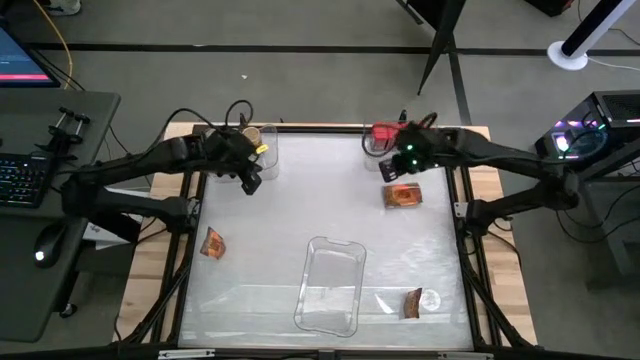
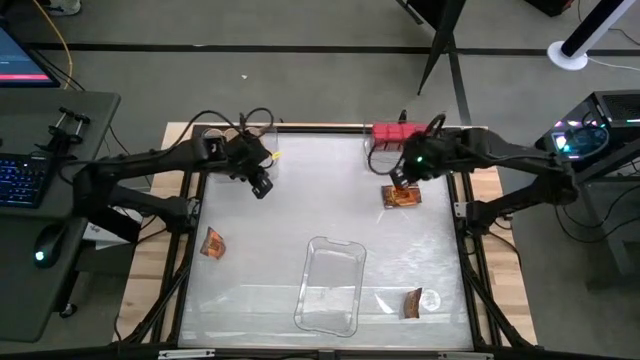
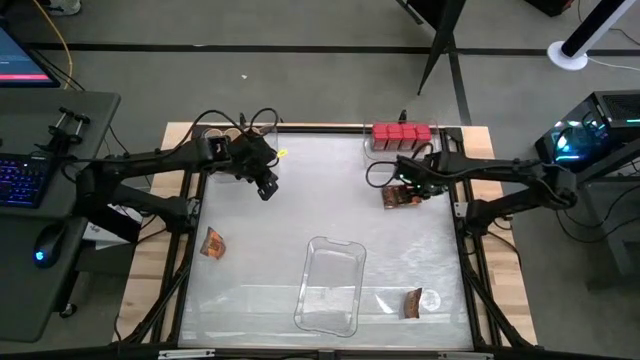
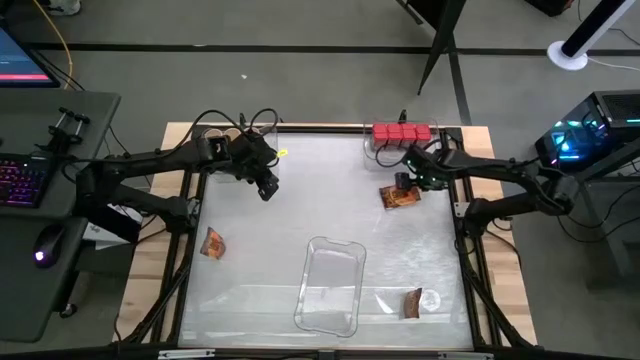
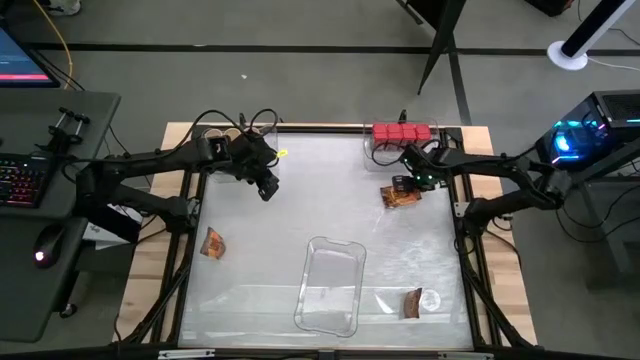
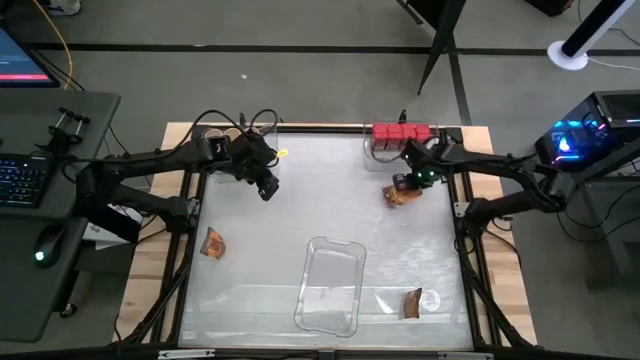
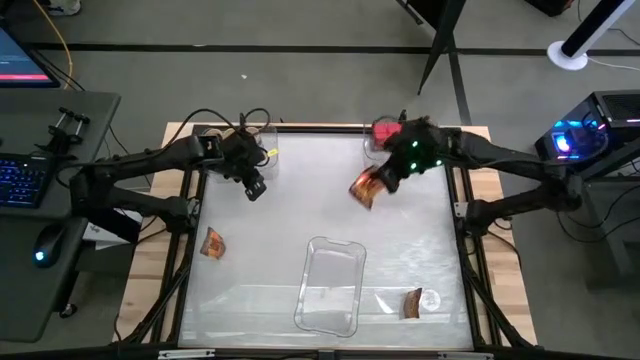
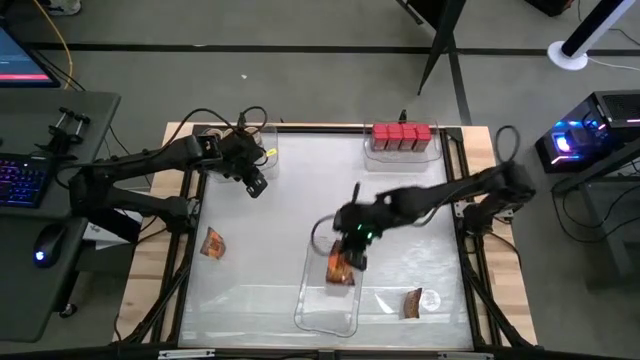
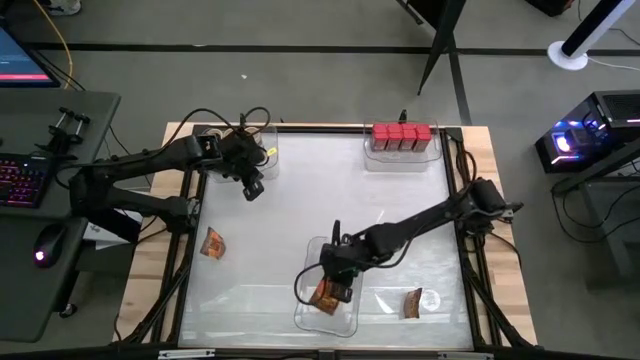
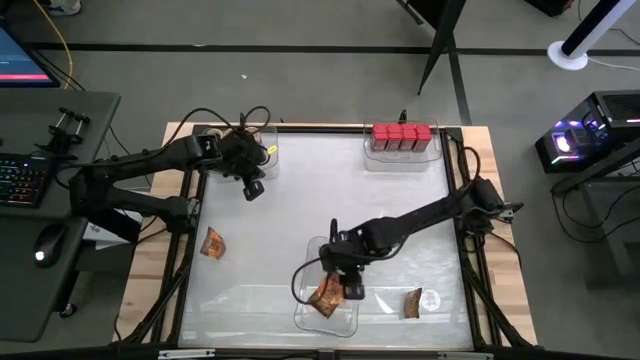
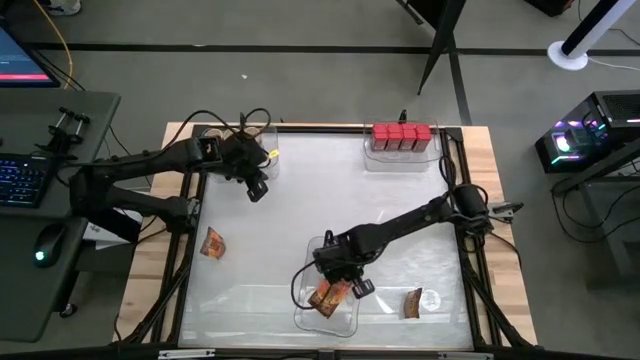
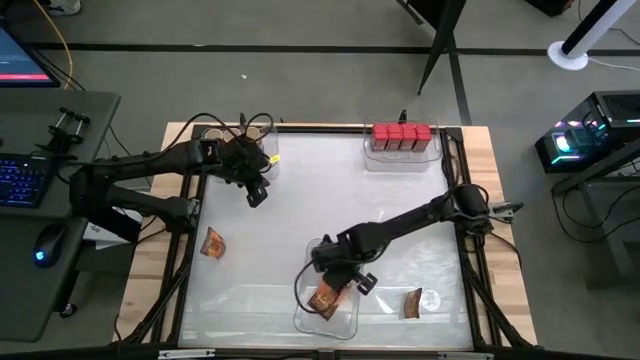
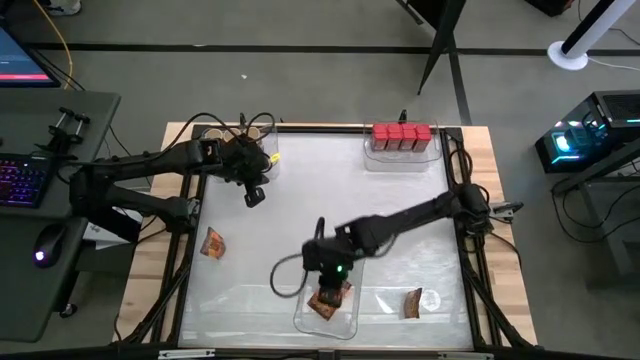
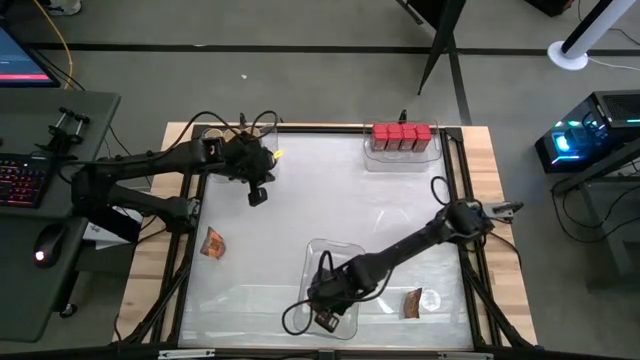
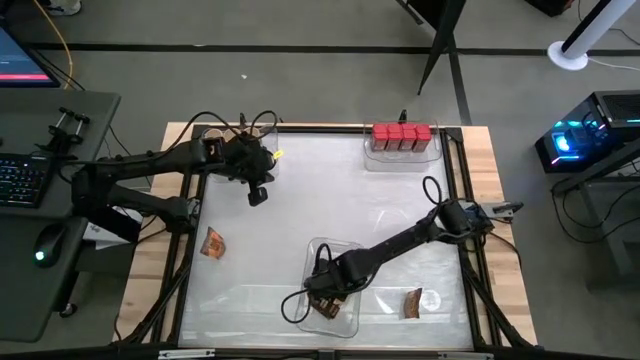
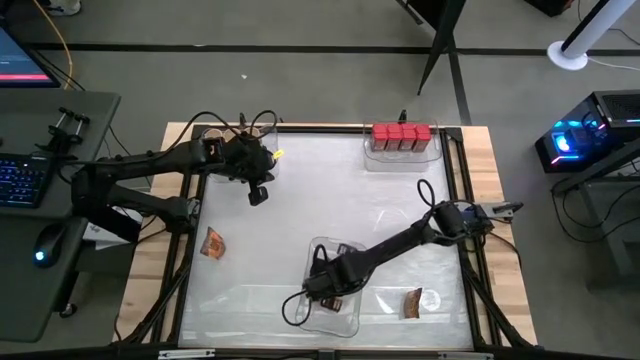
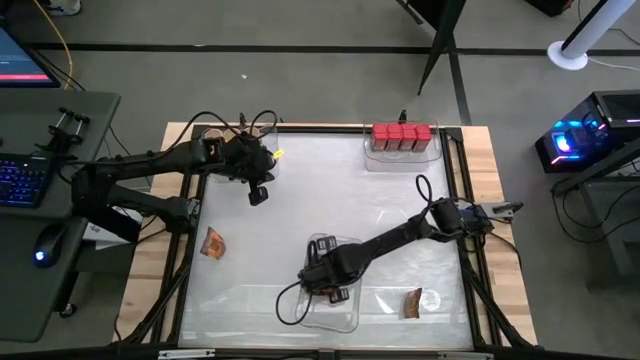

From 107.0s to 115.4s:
Task: Sort spices by type
Put the top orange seasoning pack into the bottom transparent bin

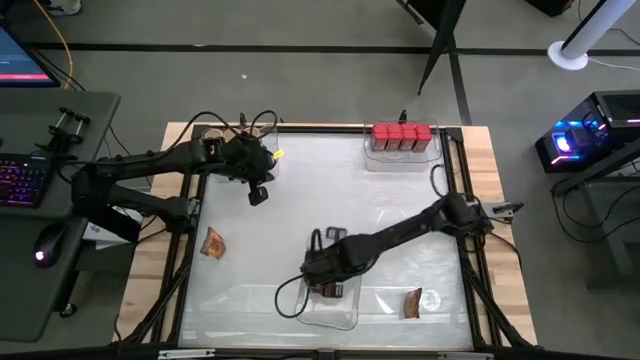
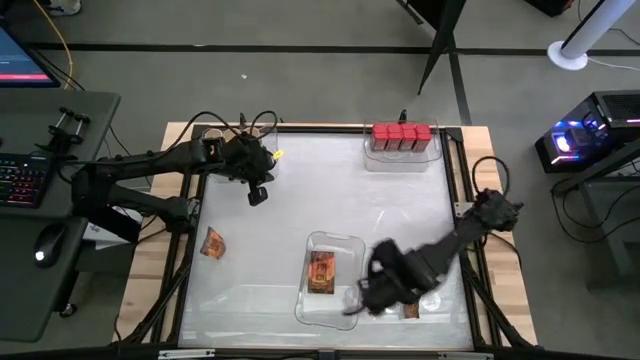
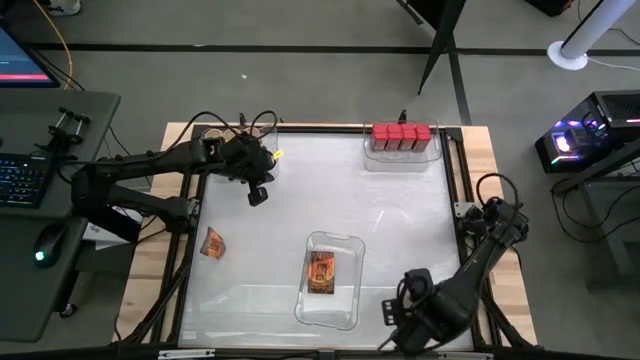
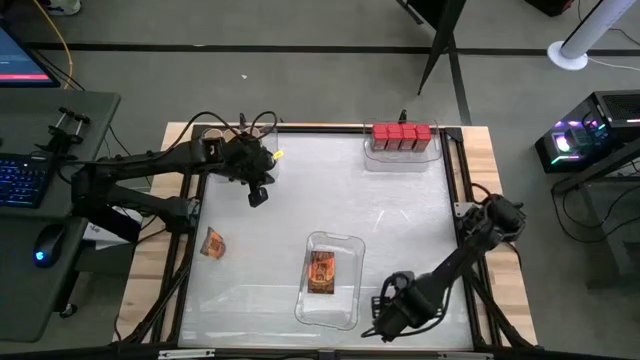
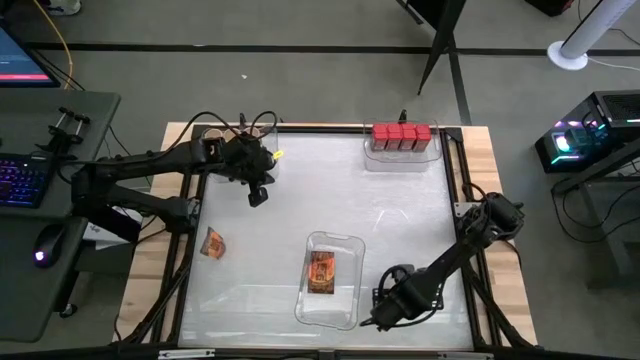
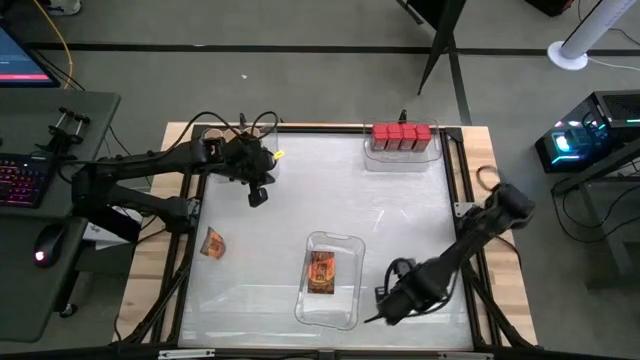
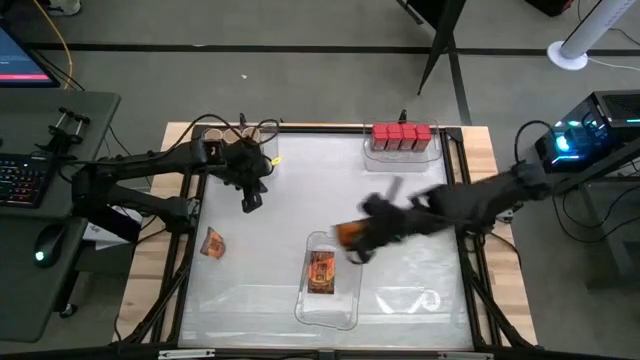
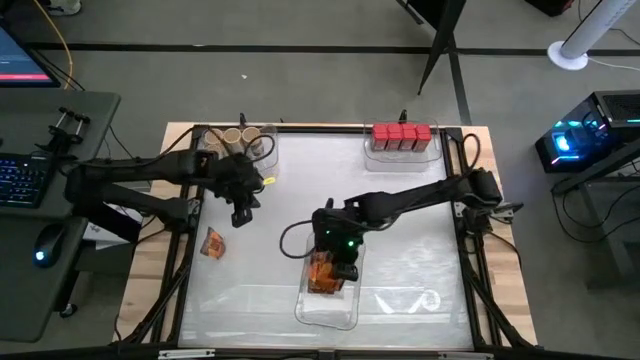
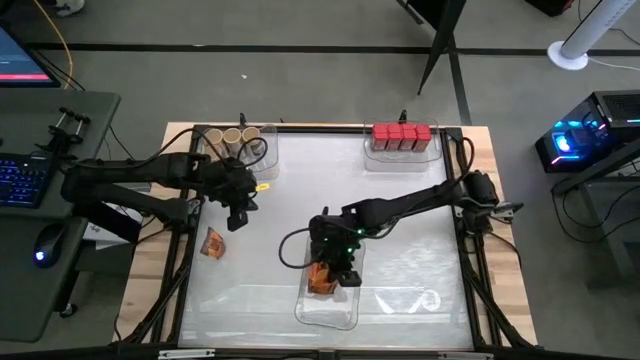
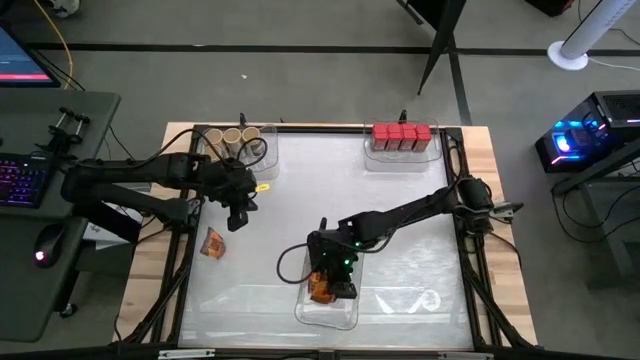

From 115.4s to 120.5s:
Put the bottom orange seasoning pack into the bottom transparent bin

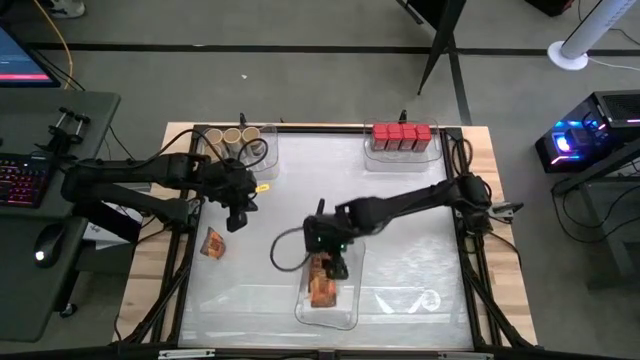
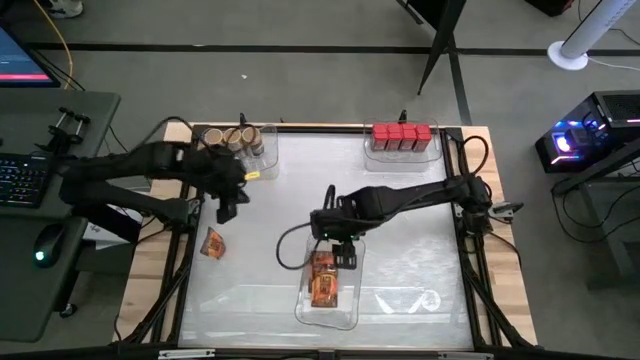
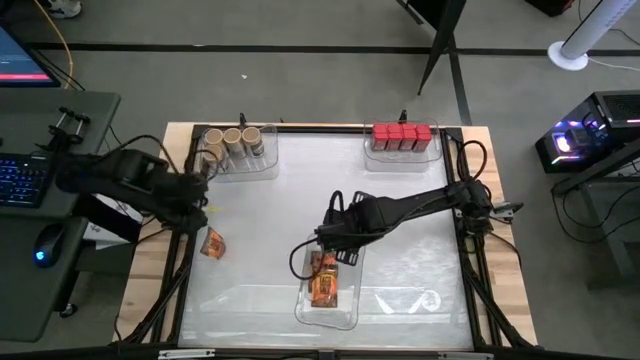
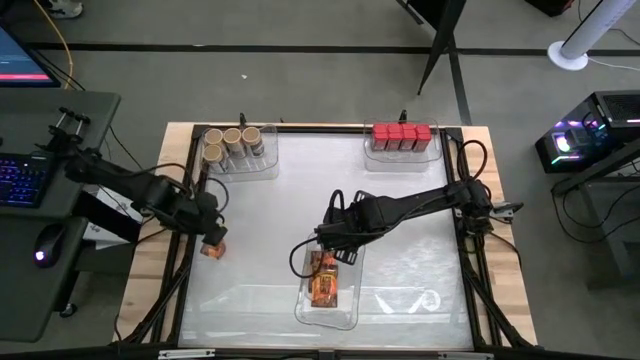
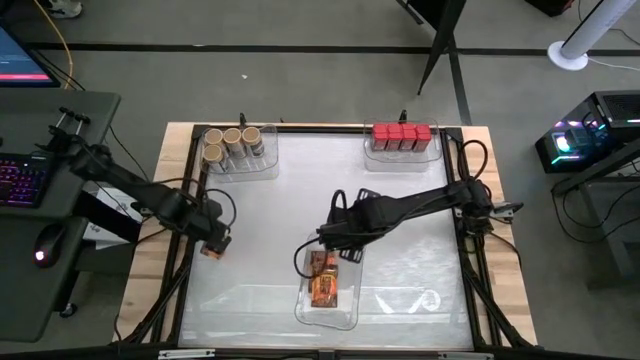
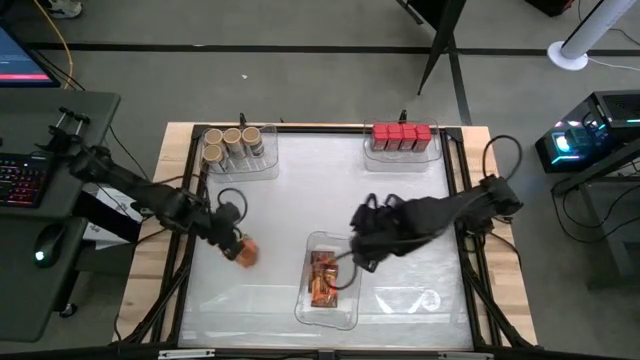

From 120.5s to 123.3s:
Put the orange seasoning pack into the bottom transparent bin

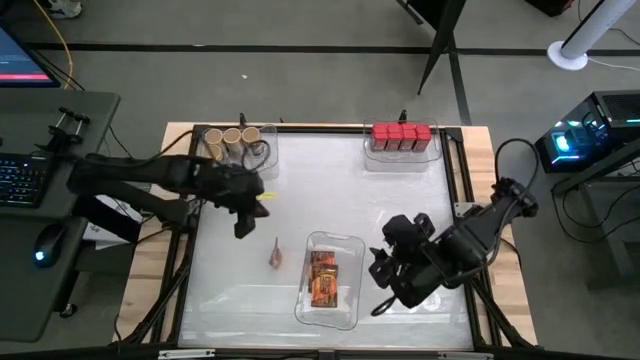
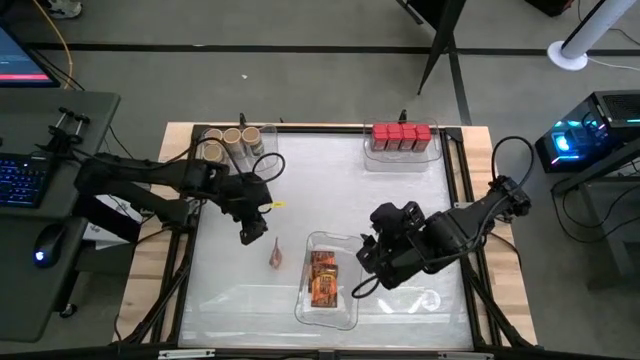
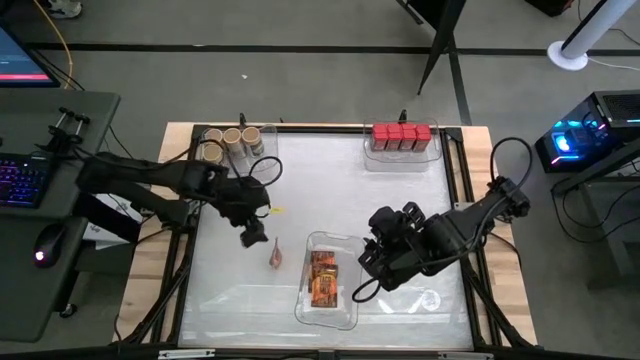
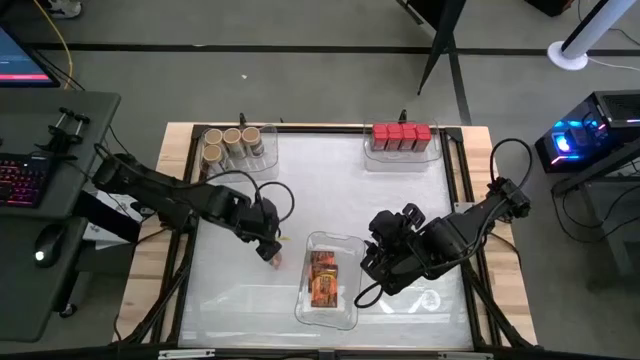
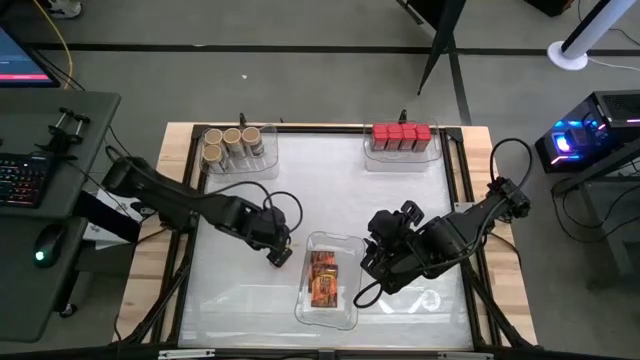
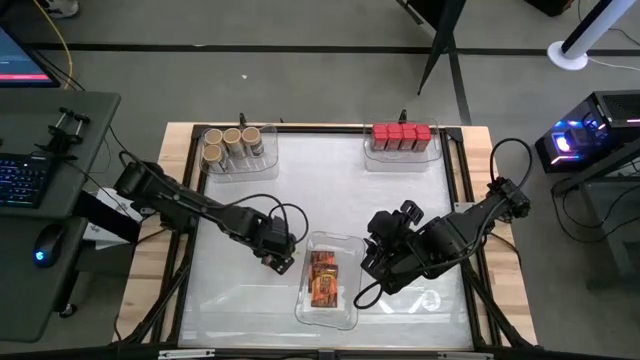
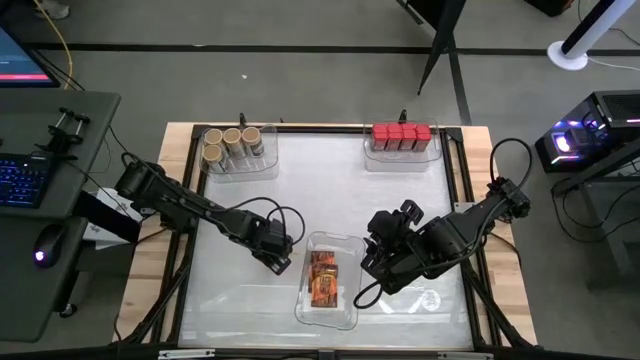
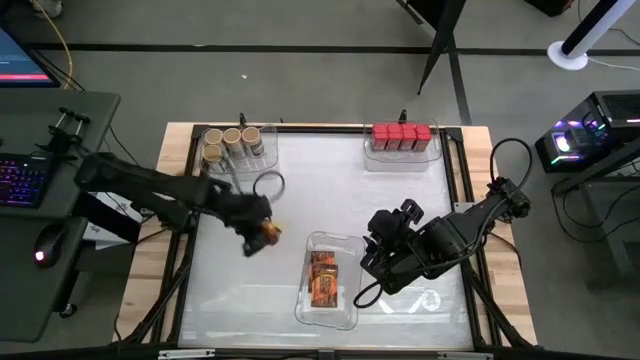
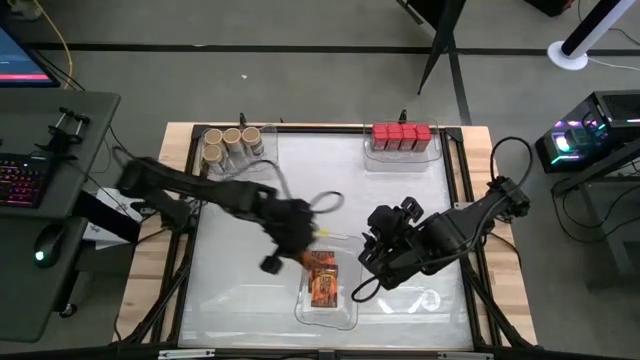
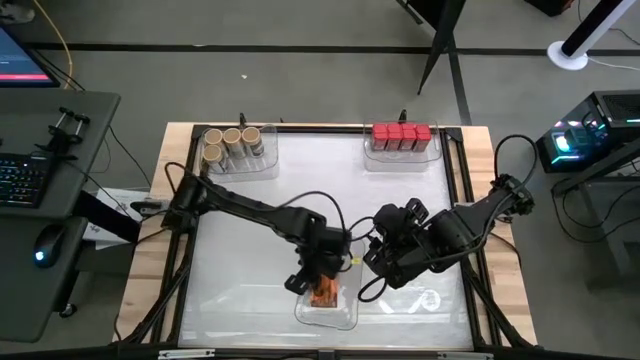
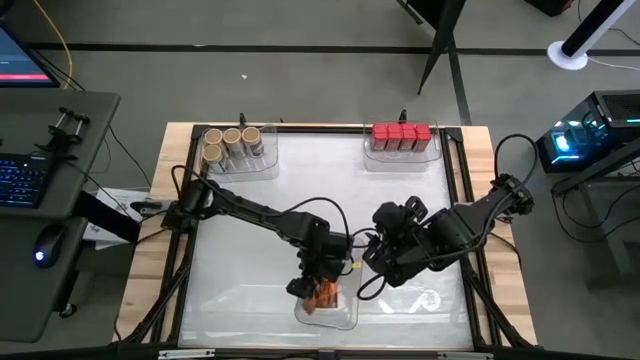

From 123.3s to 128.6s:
Put the orange seasoning pack into the bottom transparent bin
